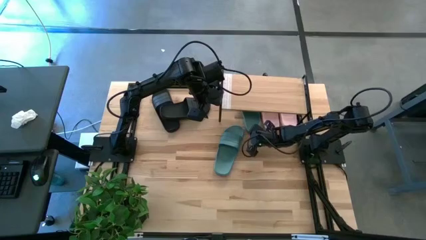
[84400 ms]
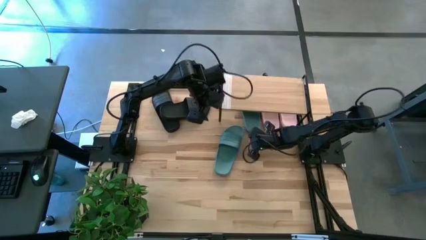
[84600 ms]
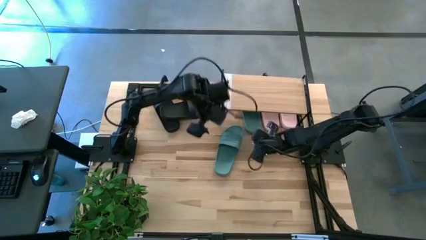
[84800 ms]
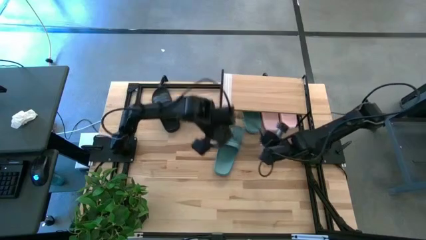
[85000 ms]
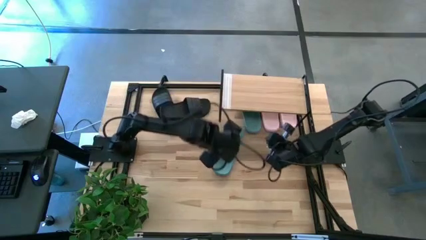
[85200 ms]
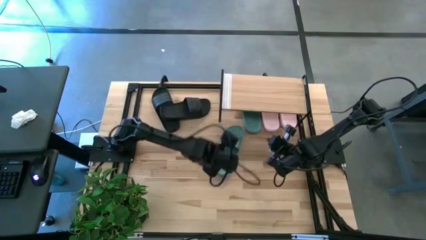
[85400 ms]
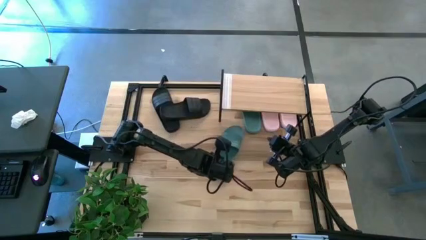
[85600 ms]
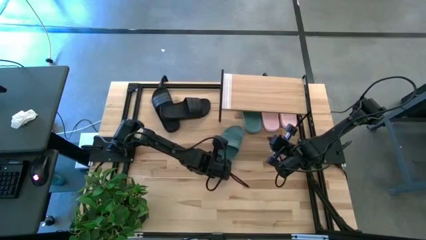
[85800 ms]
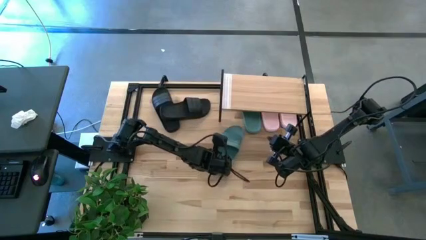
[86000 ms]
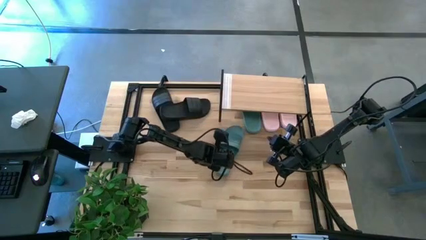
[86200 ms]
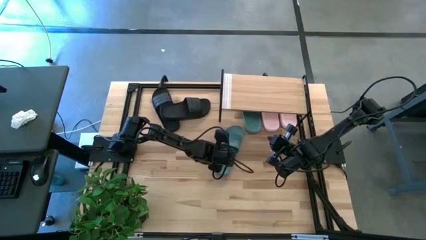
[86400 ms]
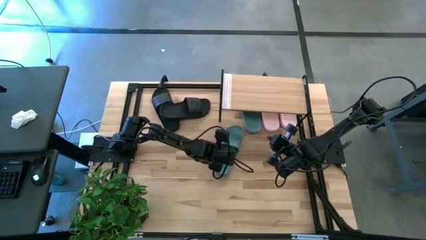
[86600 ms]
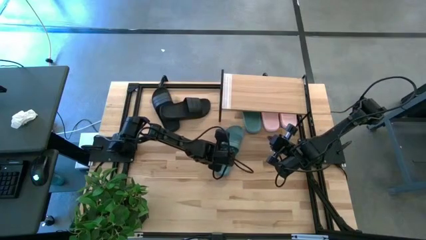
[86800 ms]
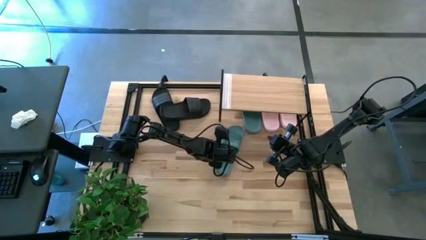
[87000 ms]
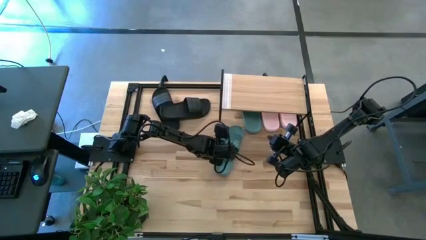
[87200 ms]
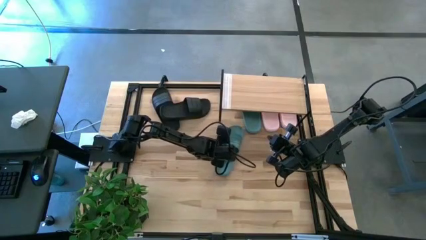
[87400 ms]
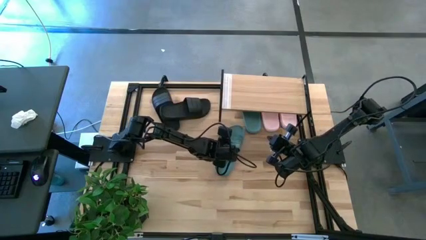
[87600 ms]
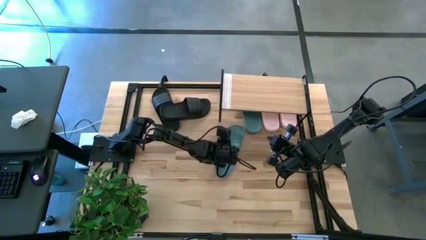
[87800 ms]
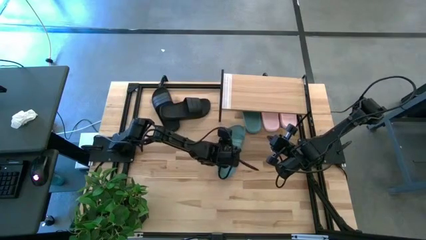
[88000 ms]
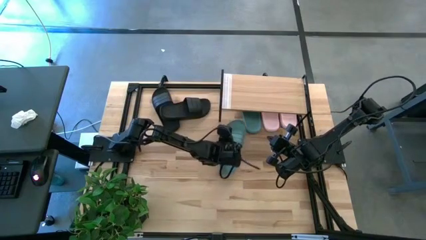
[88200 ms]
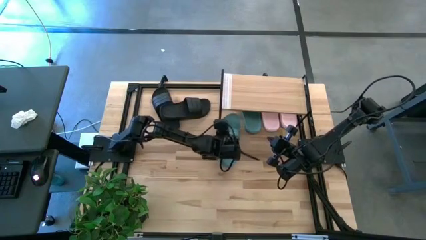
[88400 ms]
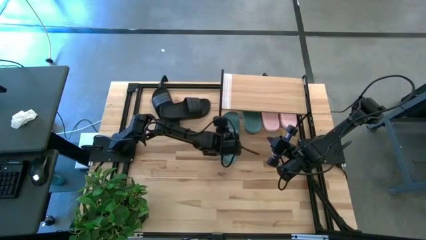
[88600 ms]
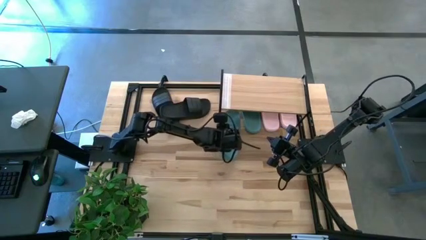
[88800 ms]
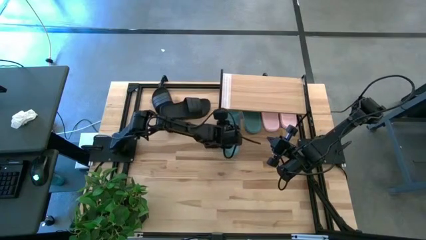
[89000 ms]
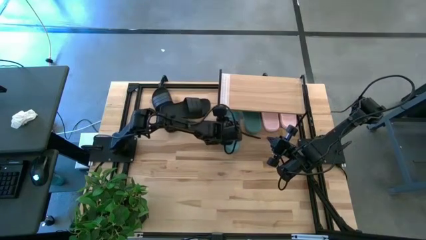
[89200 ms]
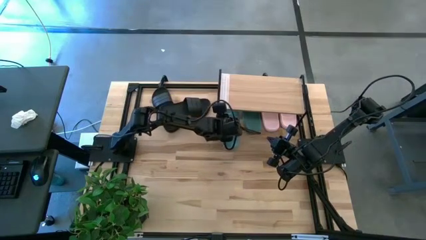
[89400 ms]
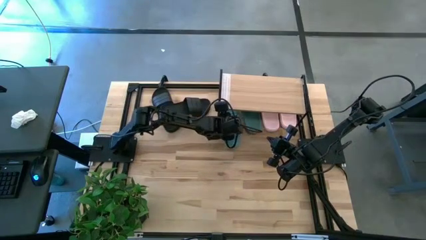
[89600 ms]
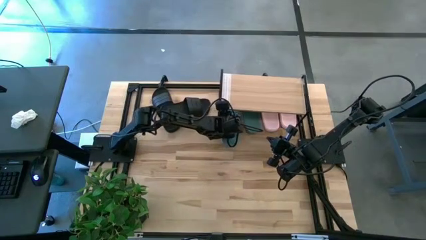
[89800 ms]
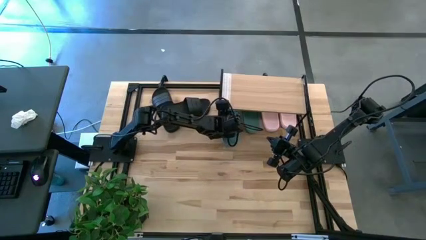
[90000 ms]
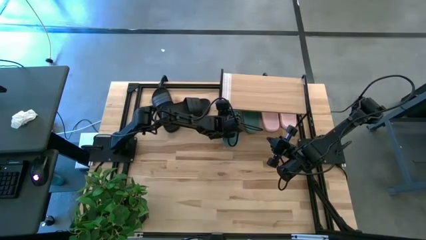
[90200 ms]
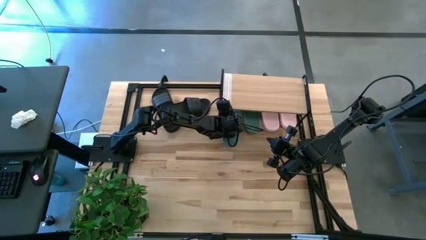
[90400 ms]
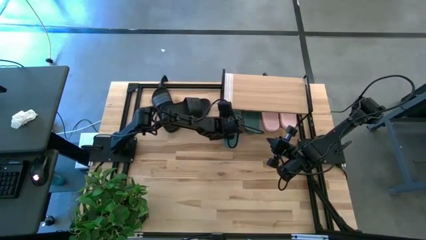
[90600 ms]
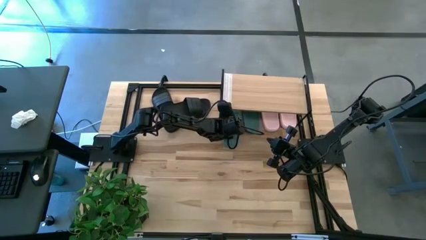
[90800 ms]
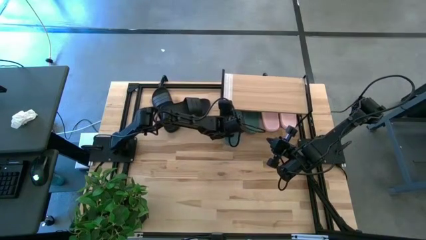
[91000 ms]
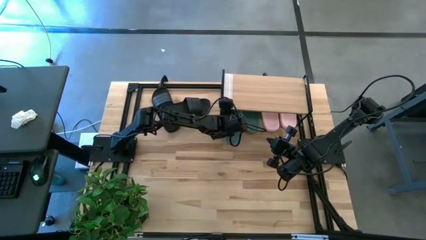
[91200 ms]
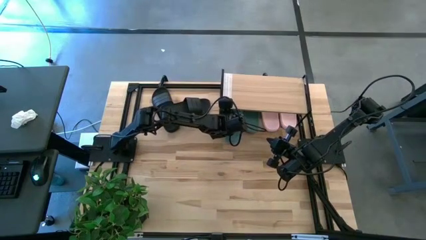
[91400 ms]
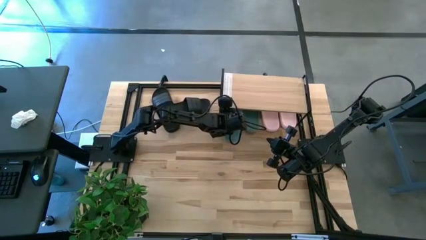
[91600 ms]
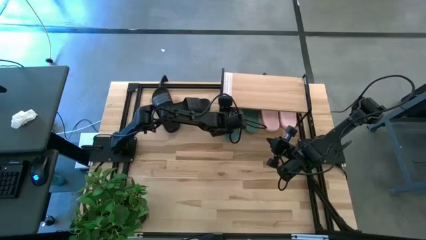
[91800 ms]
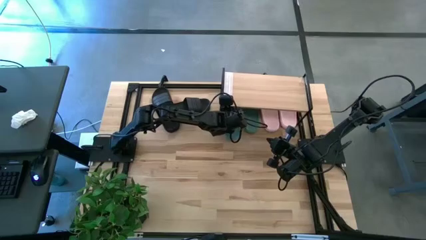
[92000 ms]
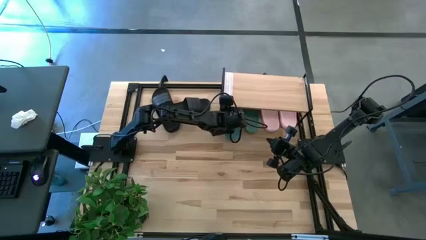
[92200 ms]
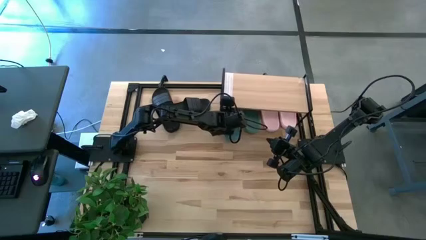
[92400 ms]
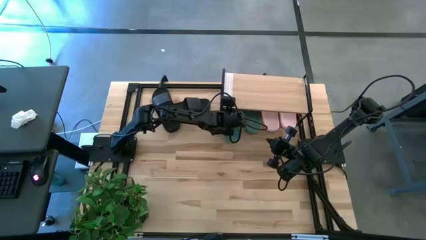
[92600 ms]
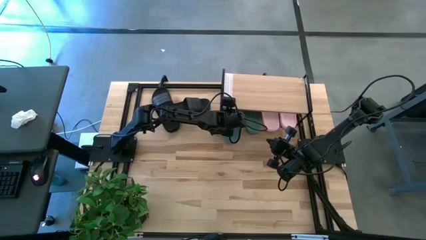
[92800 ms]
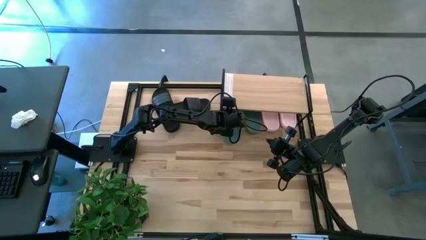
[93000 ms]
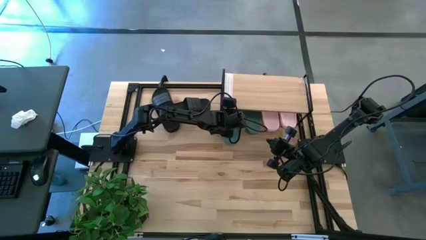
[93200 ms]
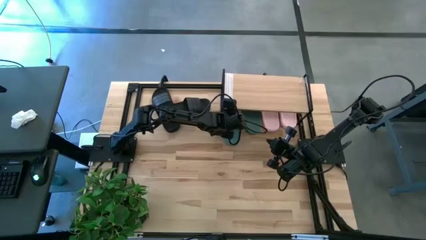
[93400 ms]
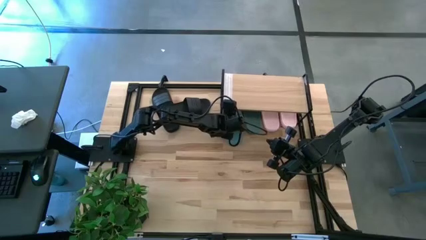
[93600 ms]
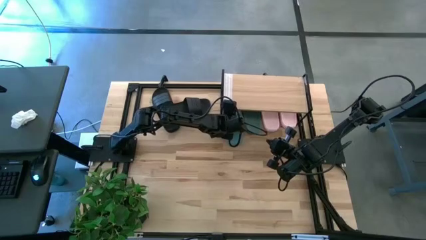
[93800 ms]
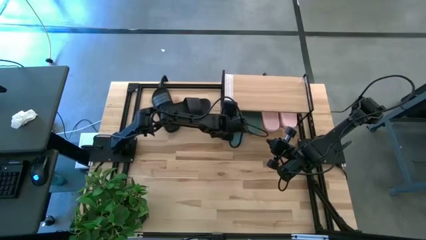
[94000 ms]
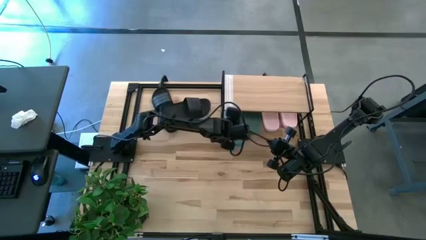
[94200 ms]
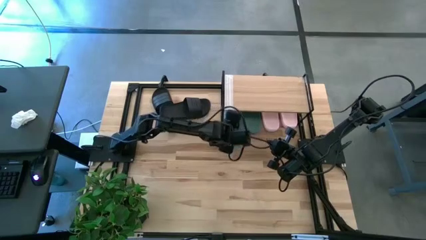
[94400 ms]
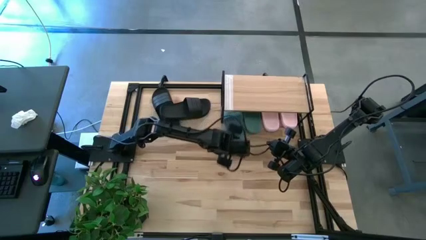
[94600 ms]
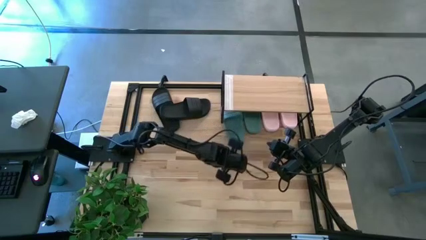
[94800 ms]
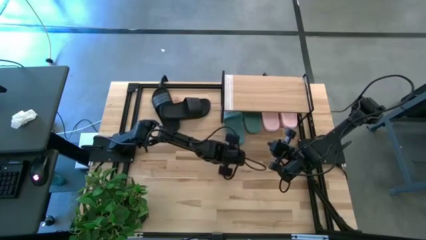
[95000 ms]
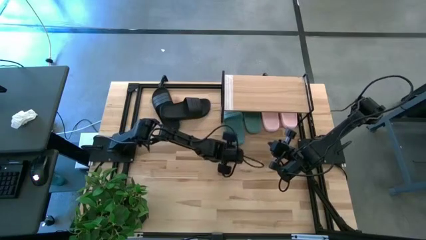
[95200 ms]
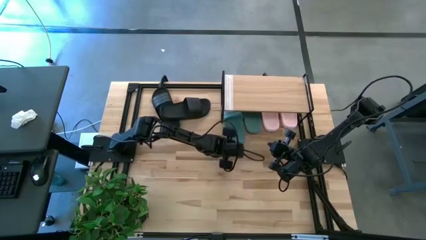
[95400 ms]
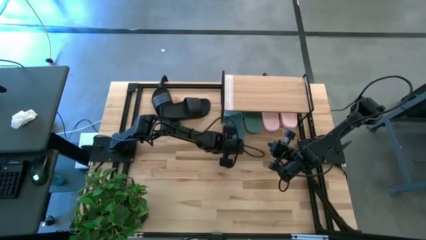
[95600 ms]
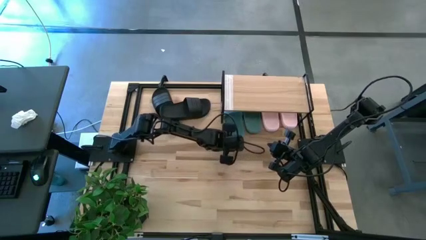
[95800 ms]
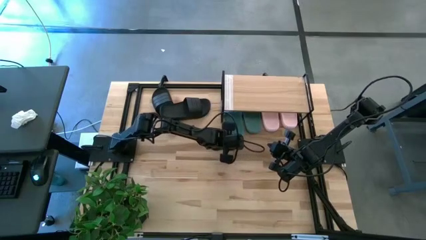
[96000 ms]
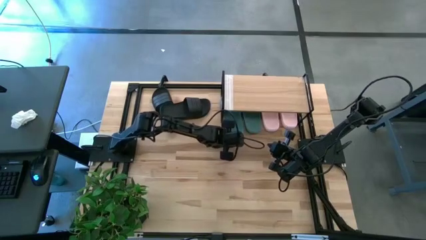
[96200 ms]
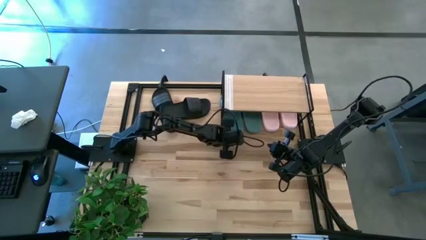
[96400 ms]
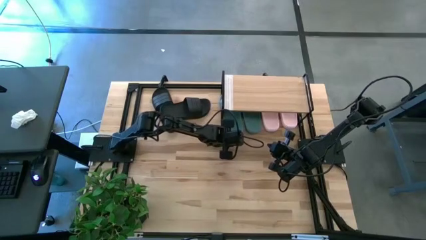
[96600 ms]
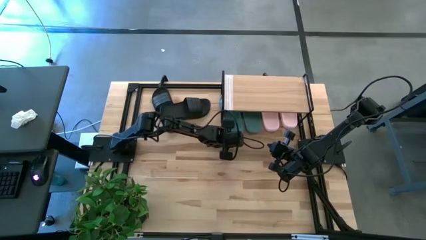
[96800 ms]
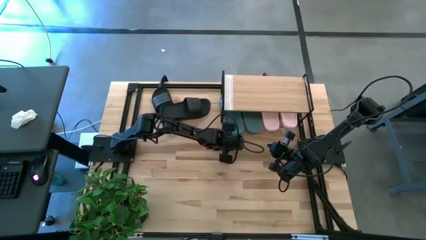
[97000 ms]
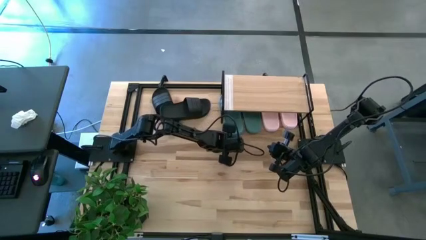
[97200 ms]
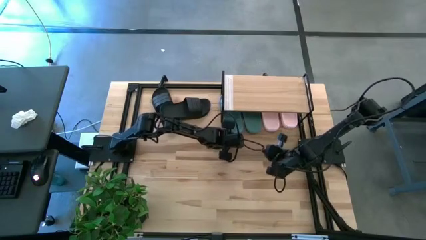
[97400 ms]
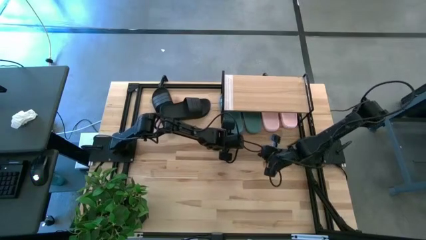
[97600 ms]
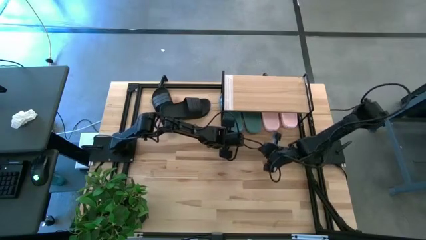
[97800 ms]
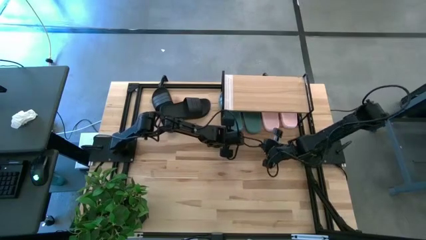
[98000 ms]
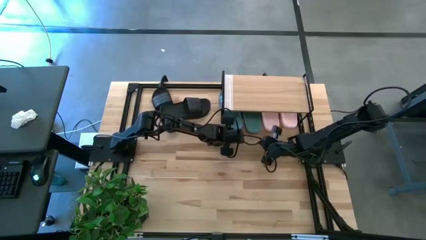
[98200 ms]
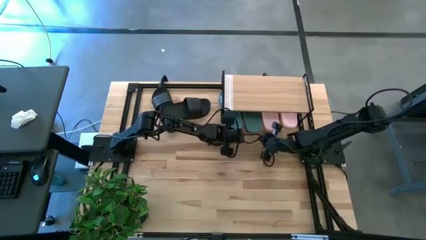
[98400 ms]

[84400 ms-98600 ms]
Task: Pick and place slides into the shelf
Put the right green slides under the shelf

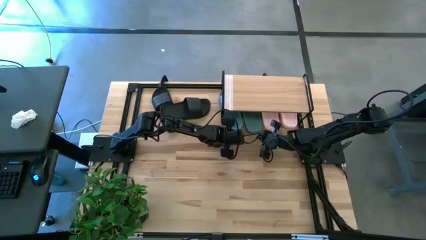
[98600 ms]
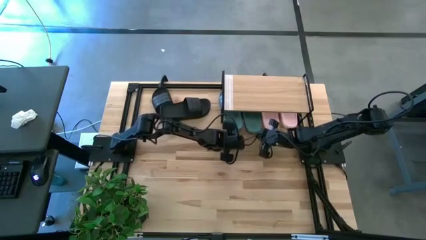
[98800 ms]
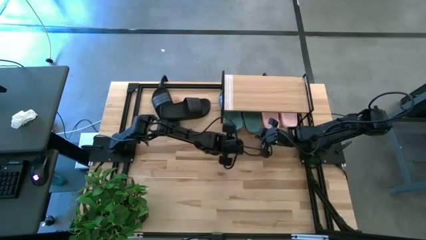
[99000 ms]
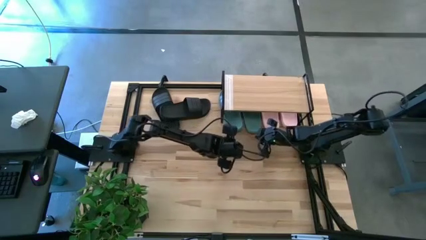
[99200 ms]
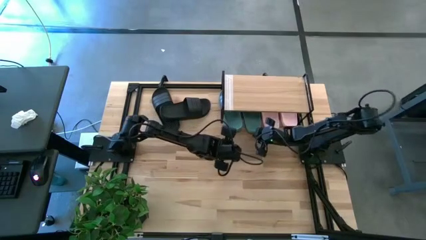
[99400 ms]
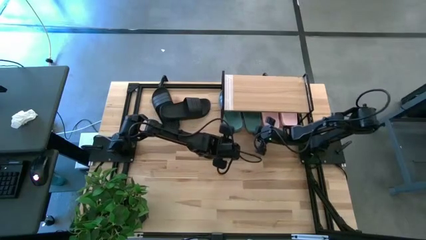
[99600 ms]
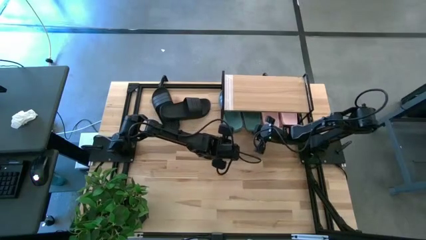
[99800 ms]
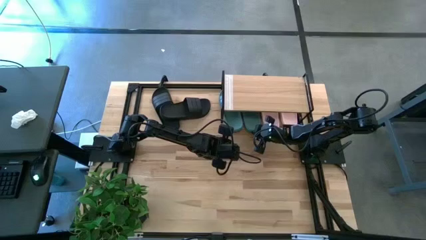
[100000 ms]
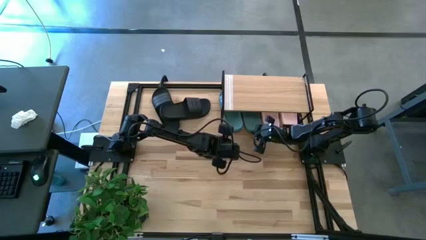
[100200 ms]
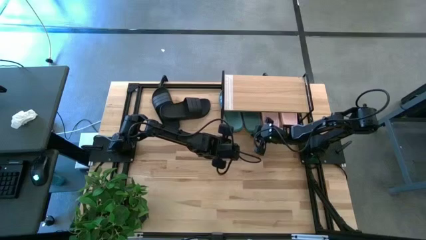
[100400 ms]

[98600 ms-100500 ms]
Adjust the right green slides
